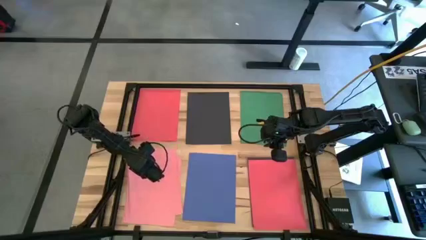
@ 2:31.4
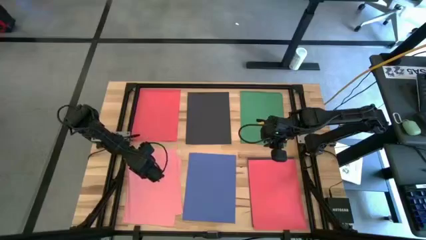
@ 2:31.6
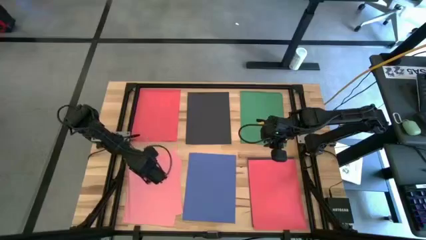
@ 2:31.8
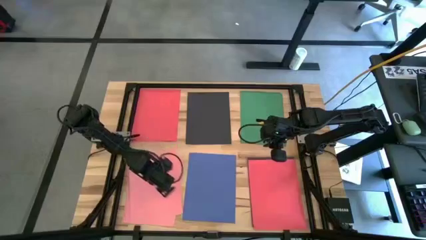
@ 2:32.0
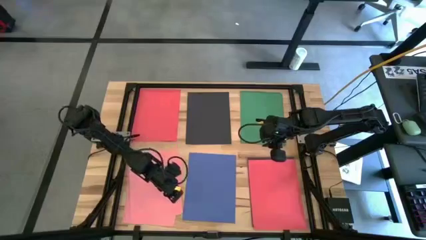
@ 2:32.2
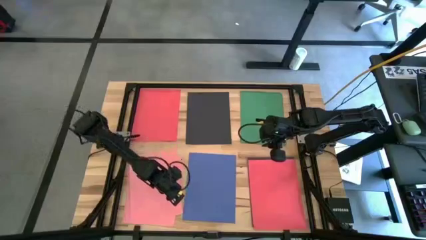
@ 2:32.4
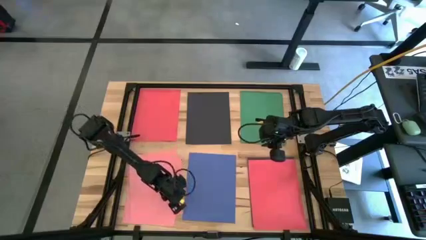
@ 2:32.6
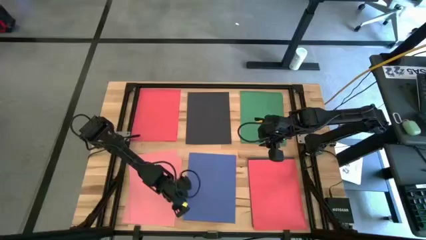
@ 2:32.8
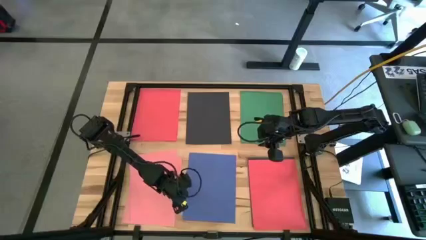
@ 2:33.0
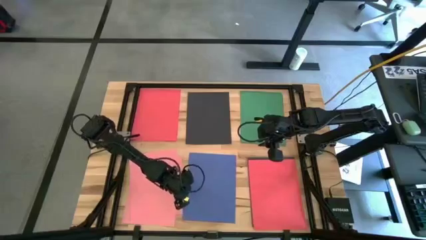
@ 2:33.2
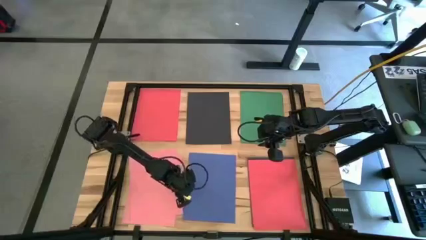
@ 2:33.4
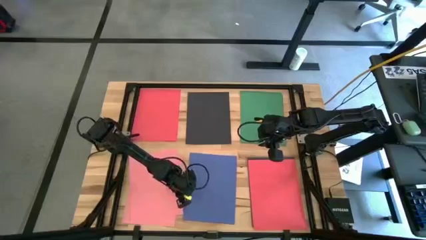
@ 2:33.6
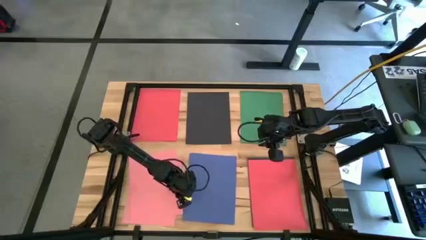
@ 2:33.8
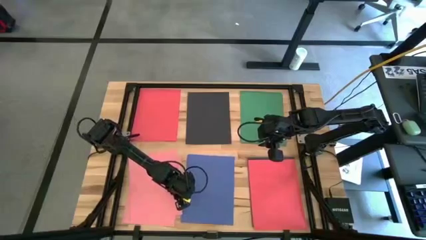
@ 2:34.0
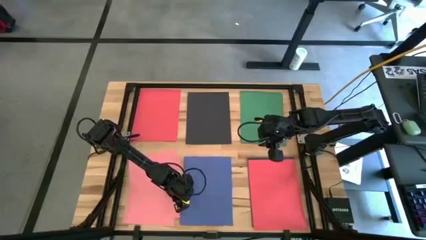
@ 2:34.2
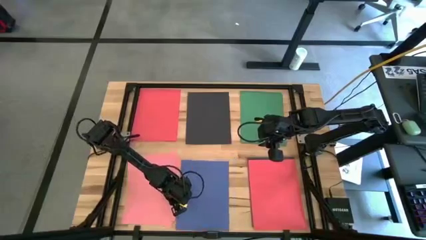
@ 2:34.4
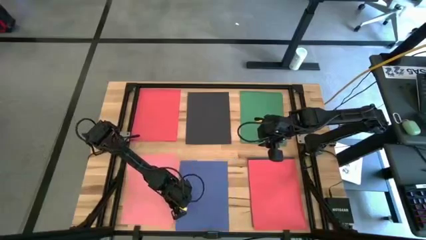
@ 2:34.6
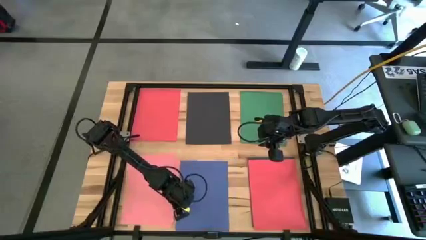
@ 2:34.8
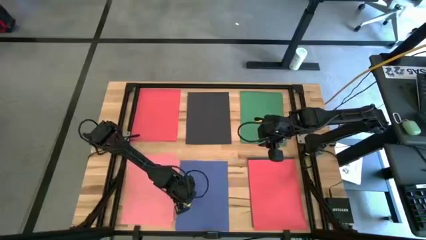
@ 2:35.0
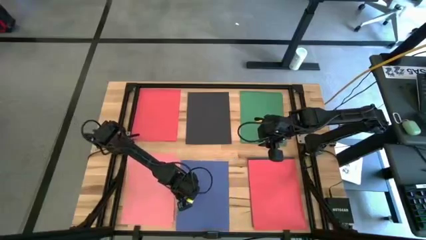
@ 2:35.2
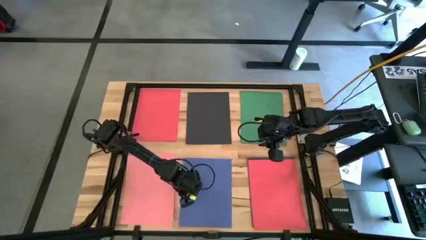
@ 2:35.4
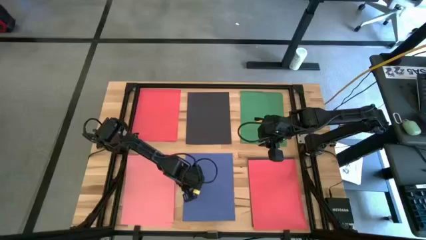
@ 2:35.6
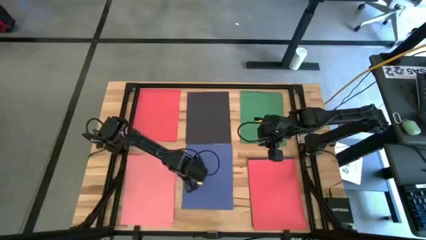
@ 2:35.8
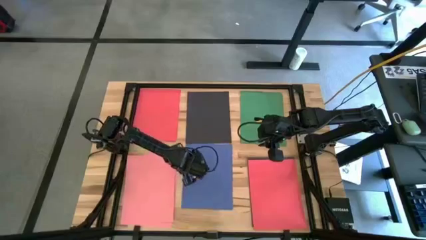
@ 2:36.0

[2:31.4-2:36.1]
Task: Organize paper
Adjust the blue paper

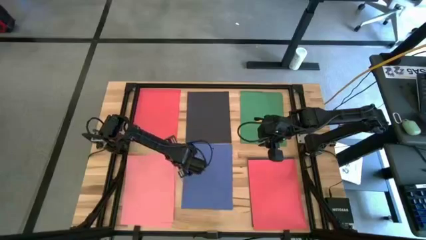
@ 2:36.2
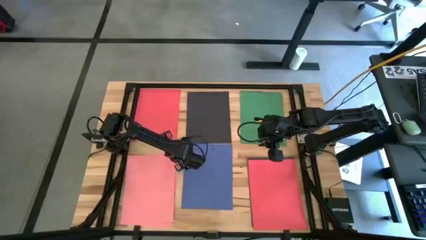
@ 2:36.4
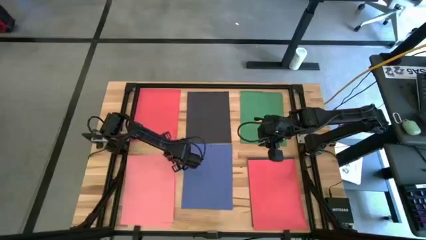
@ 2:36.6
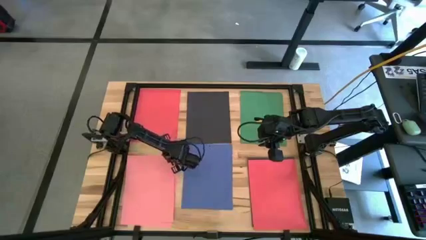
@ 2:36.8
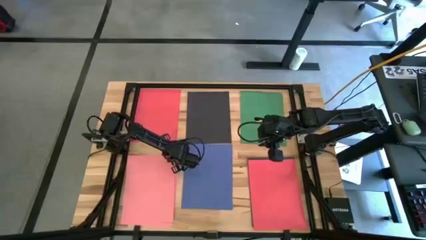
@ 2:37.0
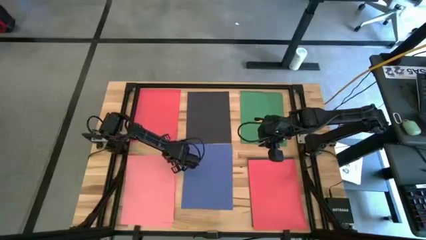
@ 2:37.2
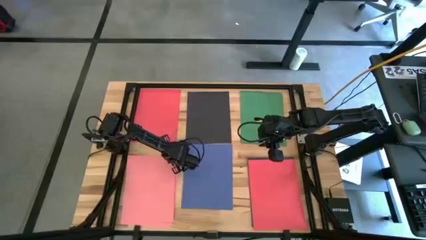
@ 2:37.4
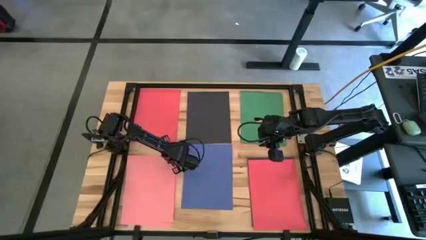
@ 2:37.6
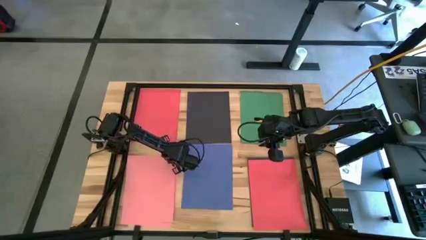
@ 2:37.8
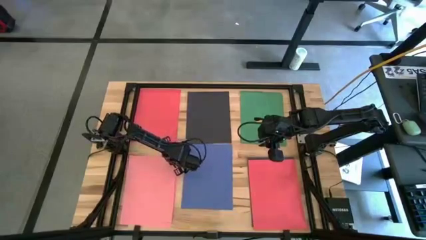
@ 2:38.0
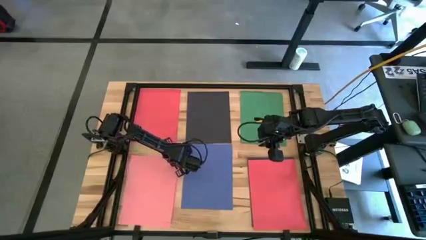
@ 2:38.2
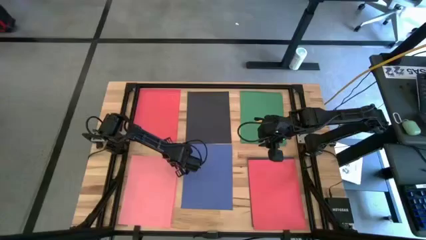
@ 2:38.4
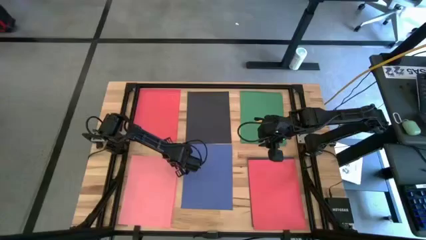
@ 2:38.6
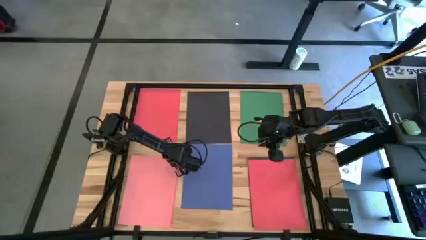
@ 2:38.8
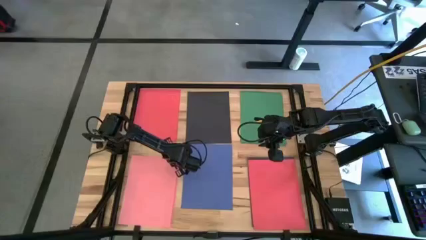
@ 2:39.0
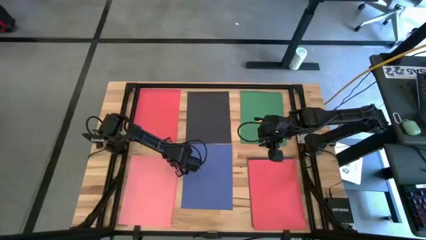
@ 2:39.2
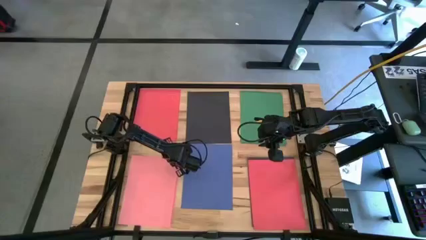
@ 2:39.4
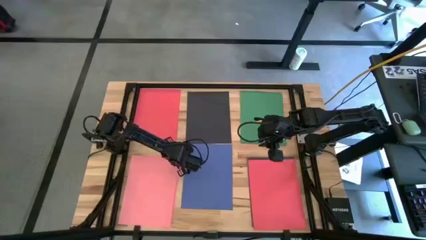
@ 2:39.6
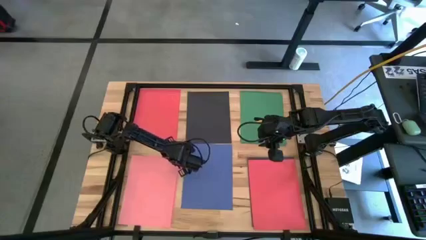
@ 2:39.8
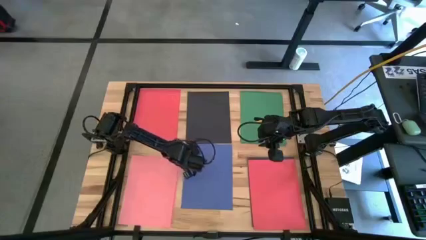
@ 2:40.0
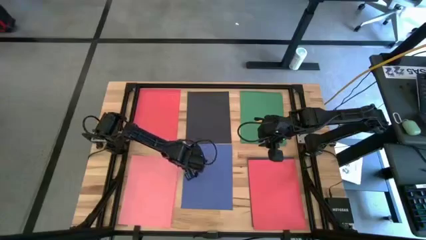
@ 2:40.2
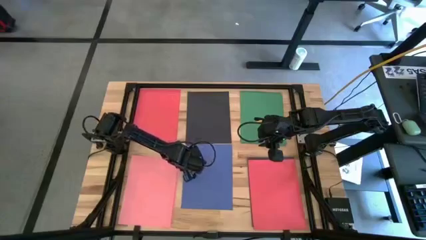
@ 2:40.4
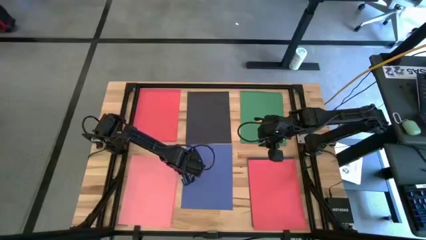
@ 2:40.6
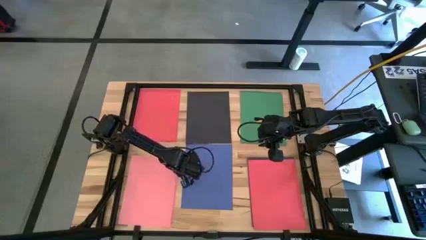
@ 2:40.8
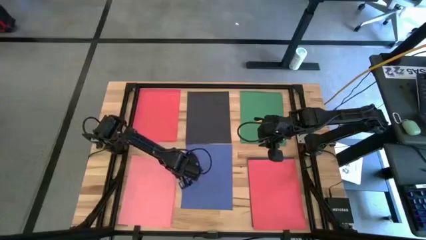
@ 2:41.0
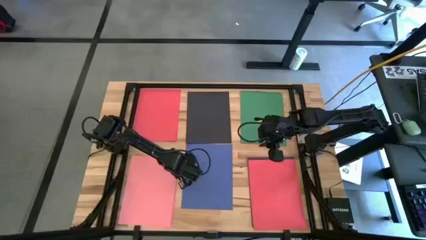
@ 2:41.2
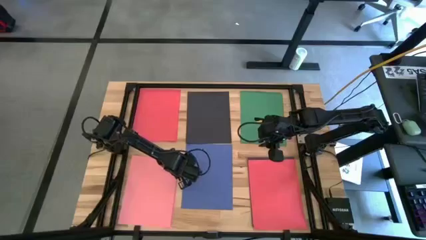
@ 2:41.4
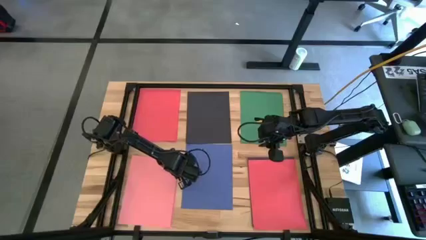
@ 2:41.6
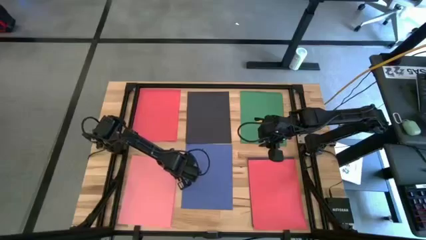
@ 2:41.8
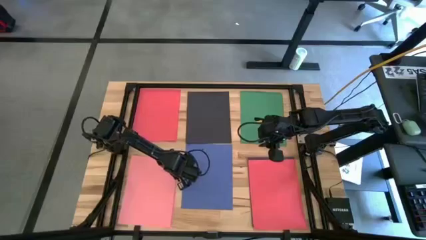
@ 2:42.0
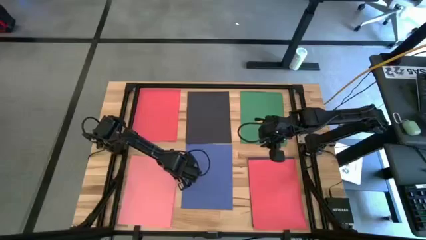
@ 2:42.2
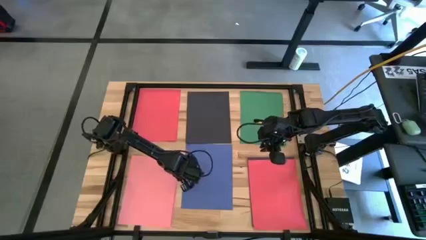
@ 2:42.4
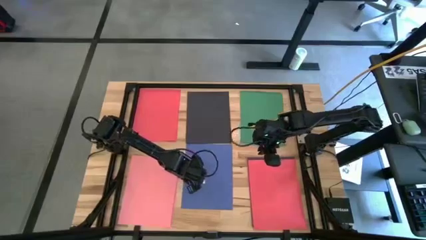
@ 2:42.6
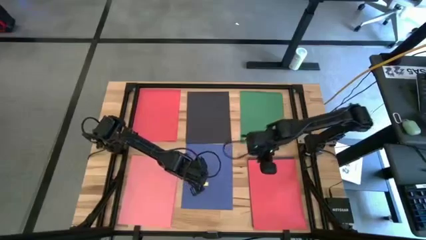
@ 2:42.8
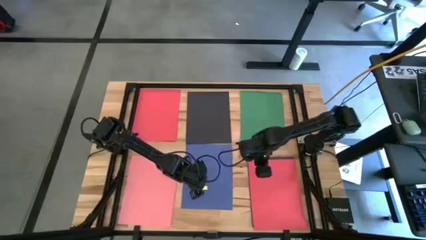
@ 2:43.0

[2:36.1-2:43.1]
Adjust the stacked pink papers
